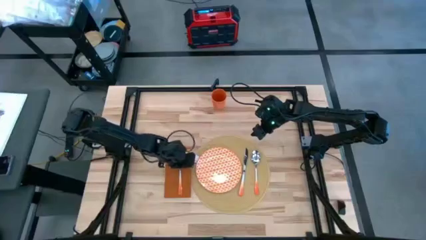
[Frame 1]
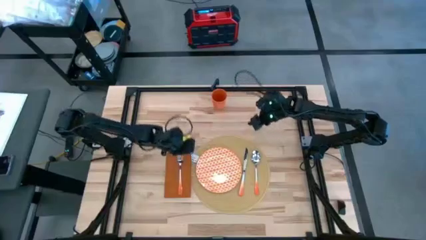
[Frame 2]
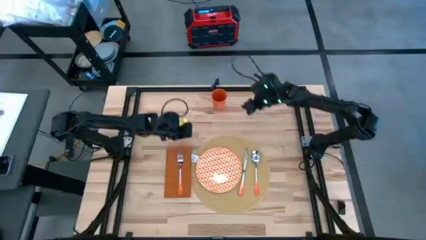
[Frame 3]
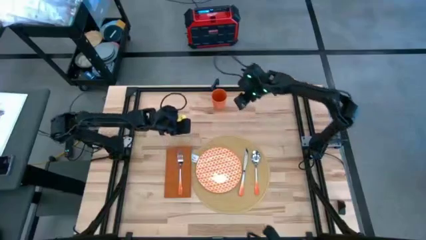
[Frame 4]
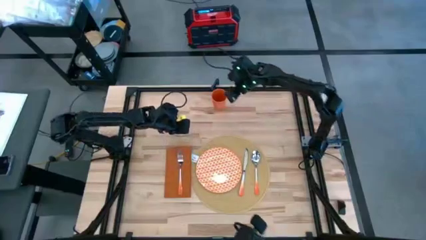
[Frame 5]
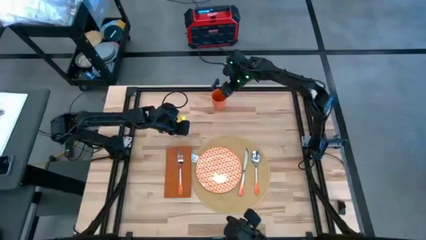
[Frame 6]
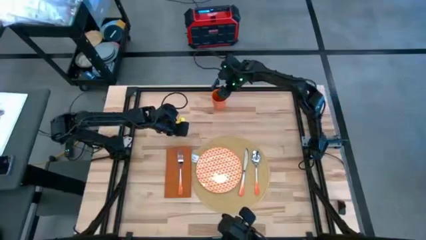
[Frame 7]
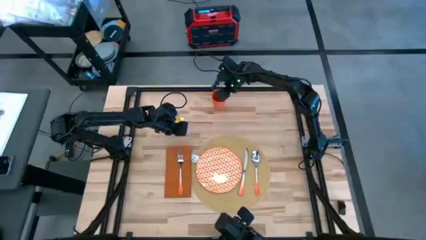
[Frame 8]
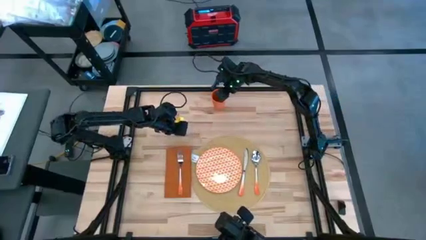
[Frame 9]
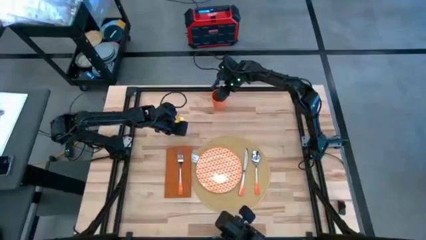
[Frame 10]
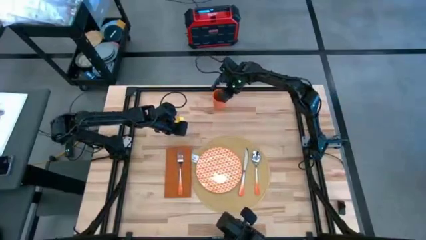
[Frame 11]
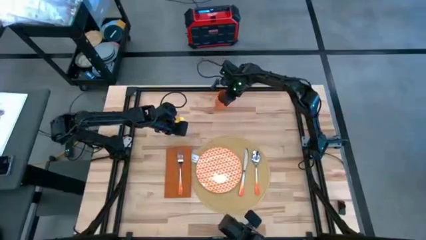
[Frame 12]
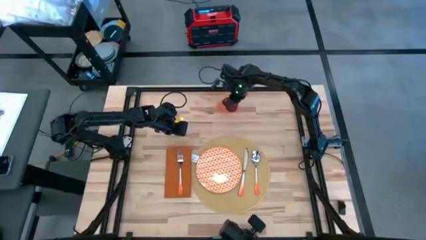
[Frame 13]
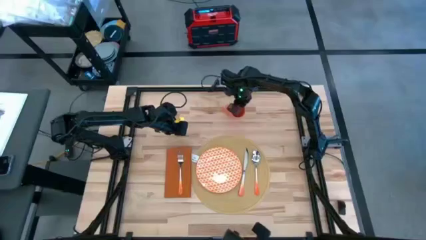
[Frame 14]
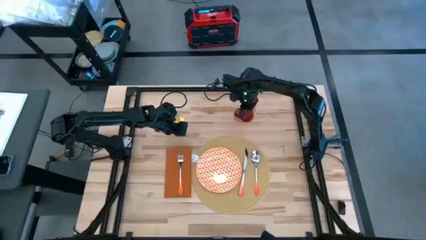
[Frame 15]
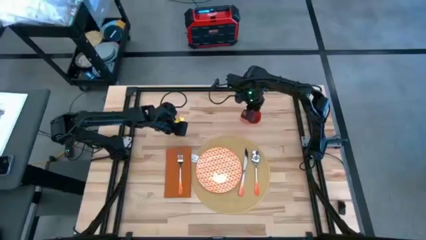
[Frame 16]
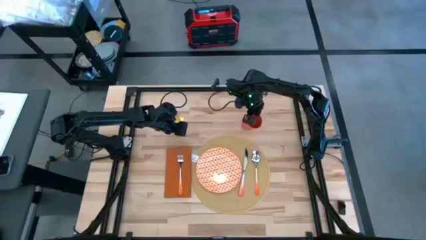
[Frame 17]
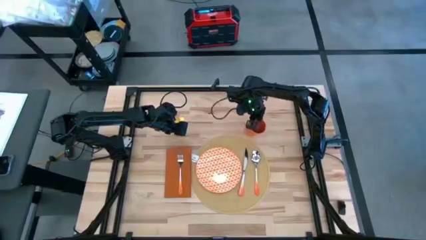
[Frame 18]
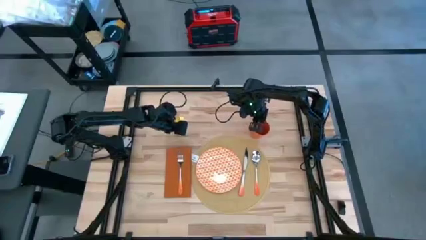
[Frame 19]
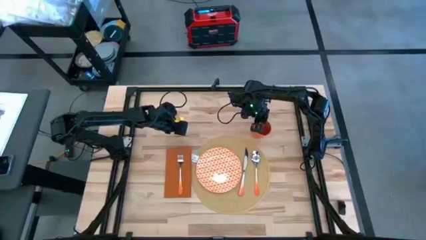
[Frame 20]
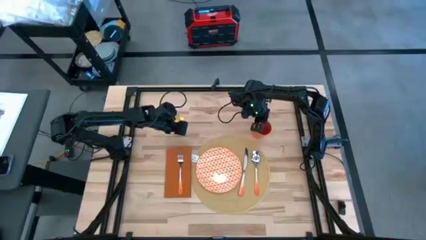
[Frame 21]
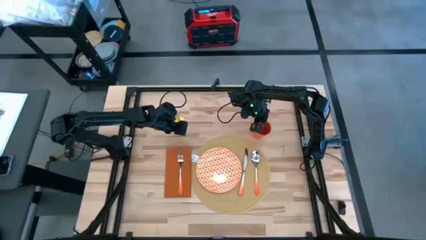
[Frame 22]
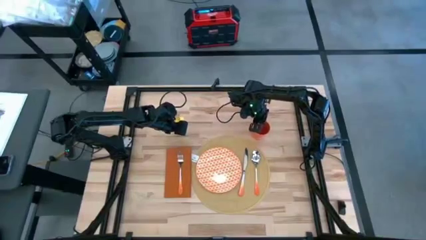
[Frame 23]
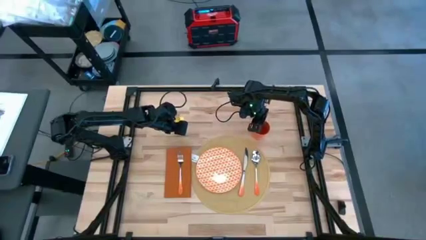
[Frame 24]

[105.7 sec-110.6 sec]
Task: Set table place
Put the orange cup to the top of the brown placemat

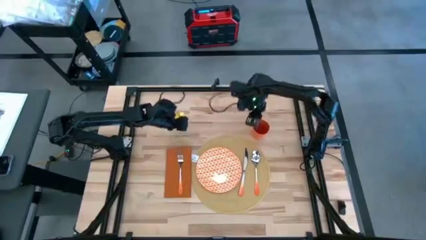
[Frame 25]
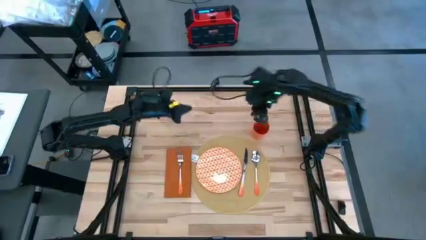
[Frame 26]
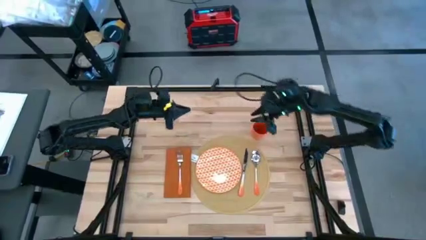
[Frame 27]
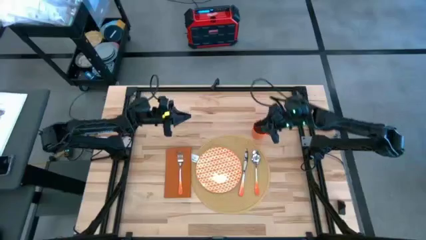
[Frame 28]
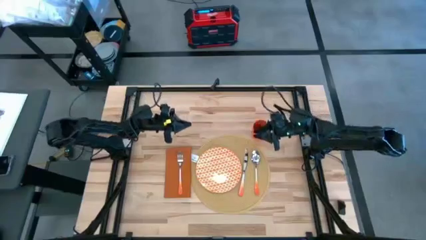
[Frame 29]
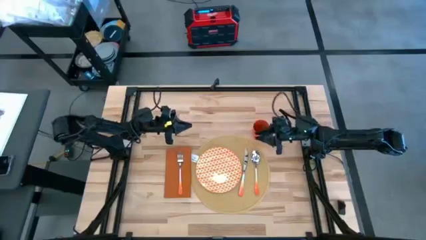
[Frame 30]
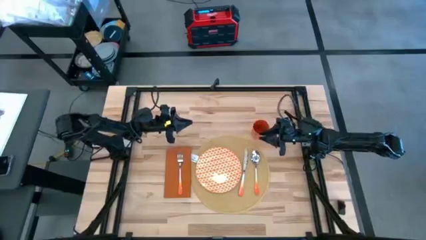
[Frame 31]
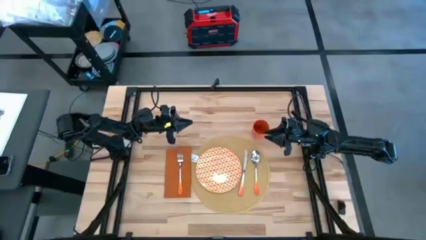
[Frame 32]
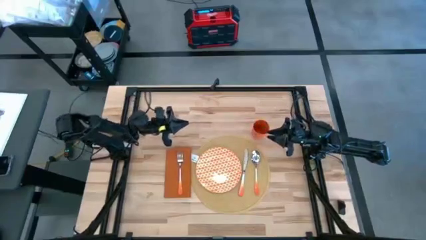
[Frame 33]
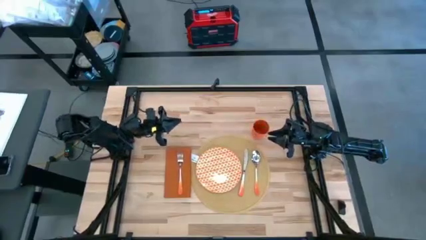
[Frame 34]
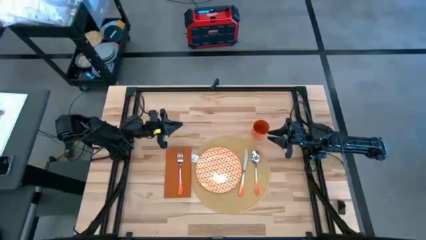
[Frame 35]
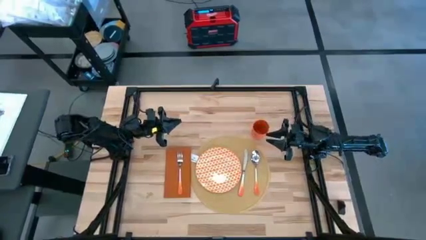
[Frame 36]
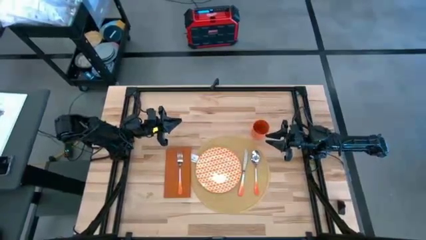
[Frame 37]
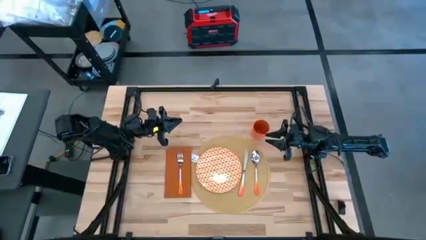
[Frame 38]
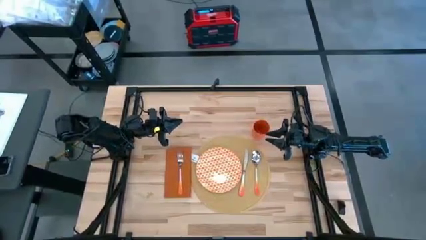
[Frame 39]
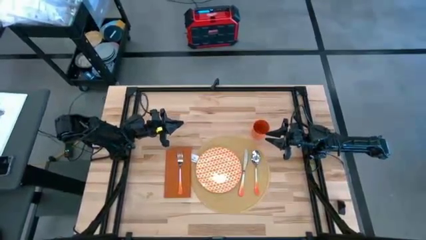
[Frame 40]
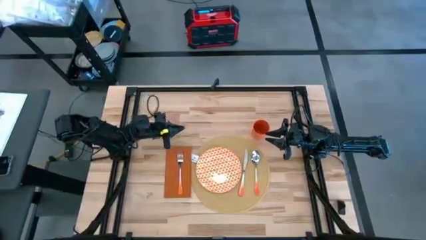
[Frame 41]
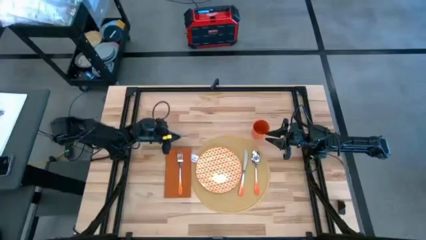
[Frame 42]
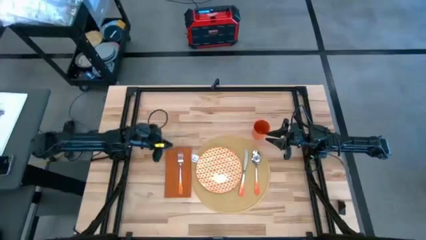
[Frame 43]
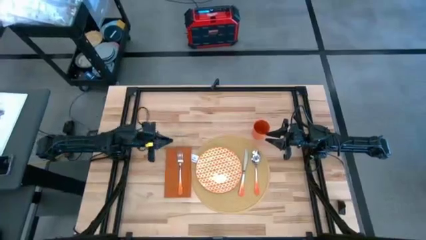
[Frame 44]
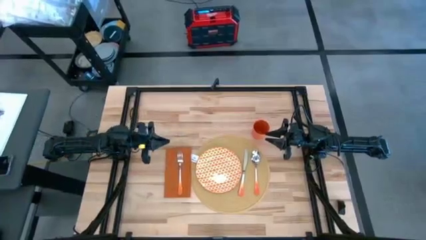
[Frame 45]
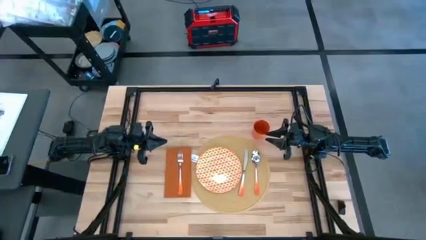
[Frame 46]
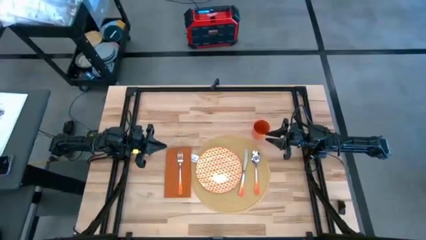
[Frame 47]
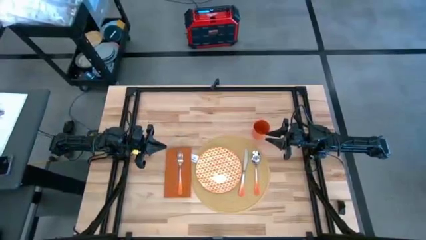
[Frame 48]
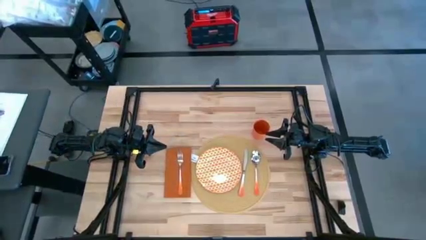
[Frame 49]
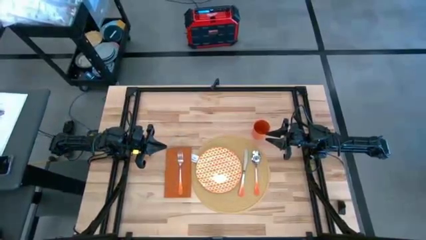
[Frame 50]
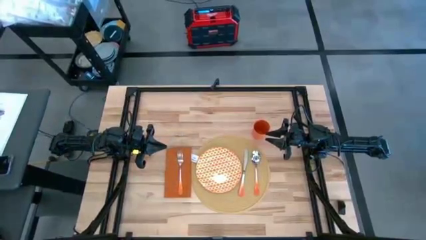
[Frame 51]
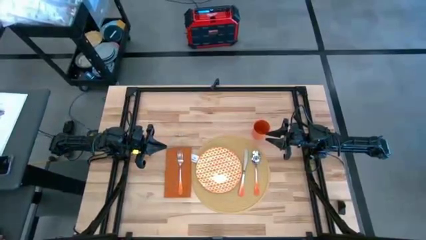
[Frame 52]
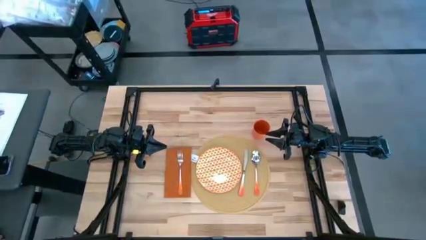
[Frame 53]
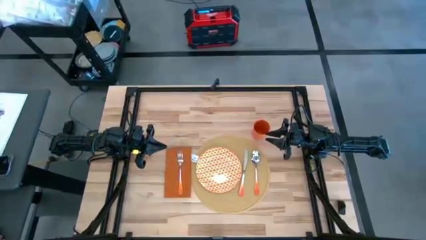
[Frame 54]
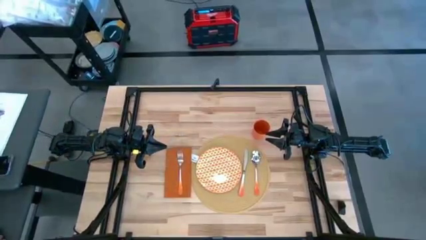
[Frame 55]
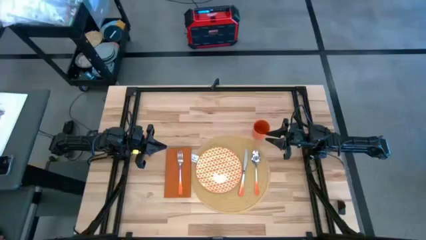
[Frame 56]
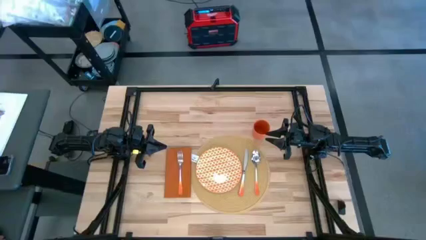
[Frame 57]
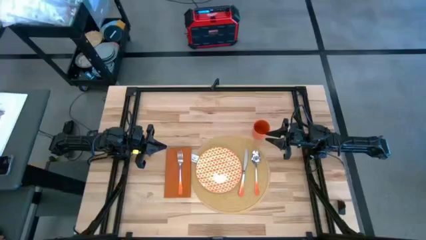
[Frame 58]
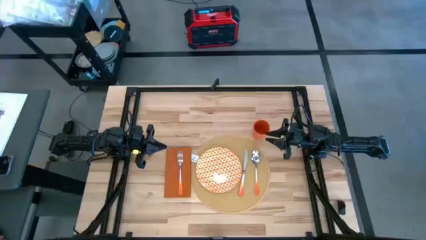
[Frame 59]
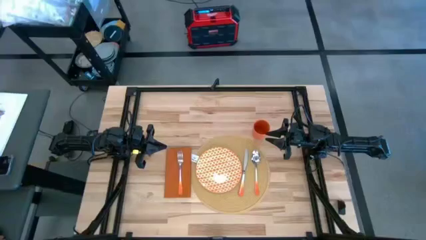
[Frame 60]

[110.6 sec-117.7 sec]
Return to Home Position
